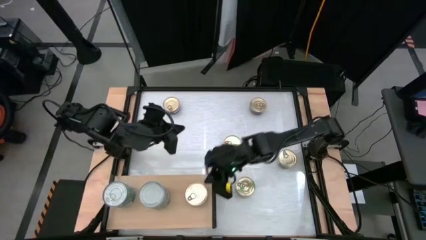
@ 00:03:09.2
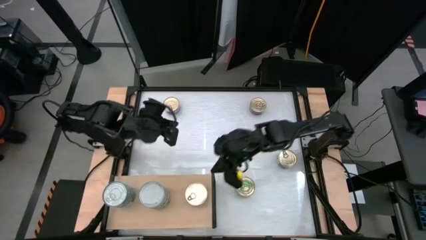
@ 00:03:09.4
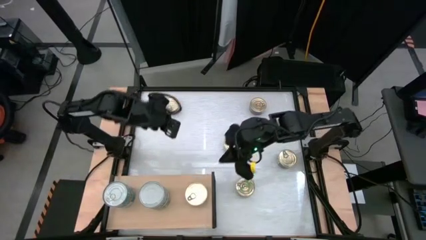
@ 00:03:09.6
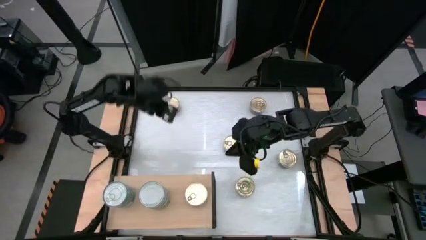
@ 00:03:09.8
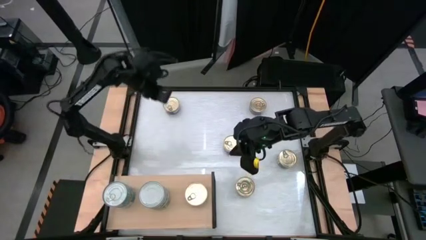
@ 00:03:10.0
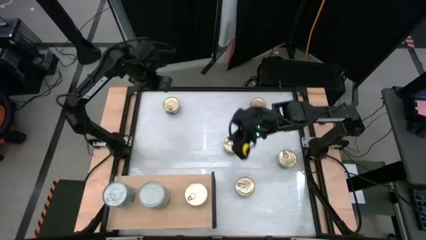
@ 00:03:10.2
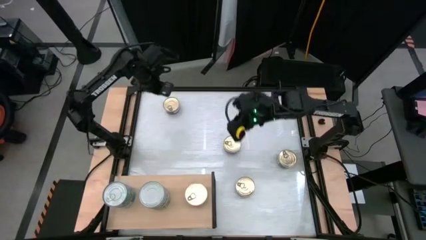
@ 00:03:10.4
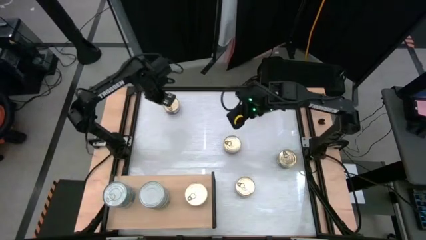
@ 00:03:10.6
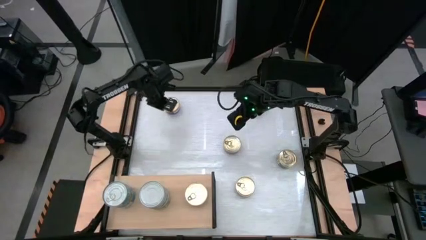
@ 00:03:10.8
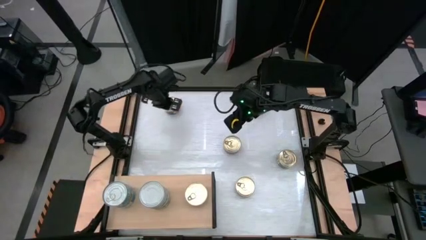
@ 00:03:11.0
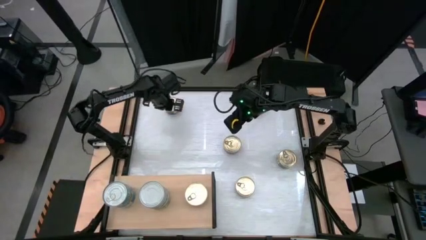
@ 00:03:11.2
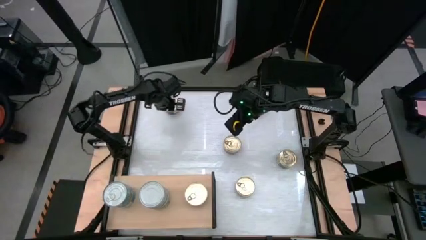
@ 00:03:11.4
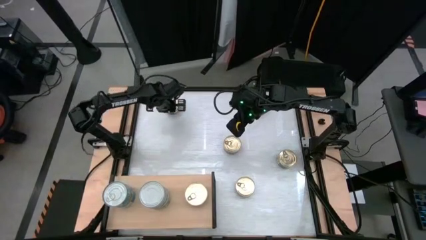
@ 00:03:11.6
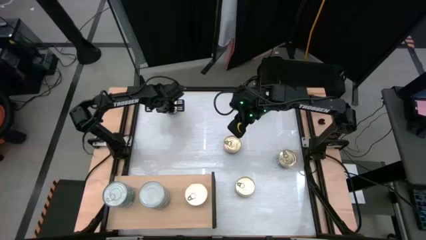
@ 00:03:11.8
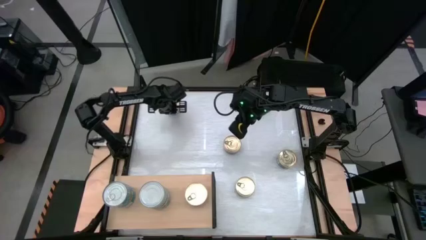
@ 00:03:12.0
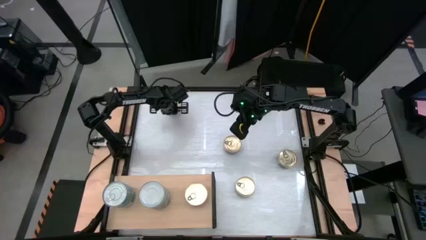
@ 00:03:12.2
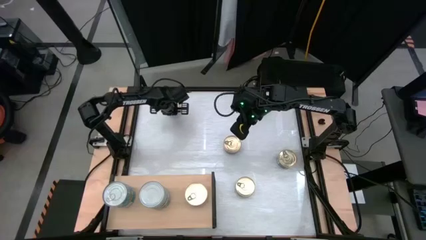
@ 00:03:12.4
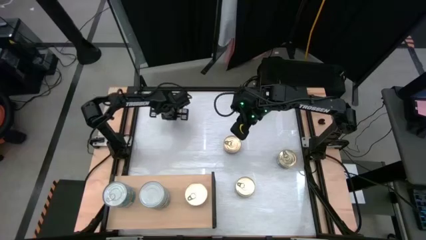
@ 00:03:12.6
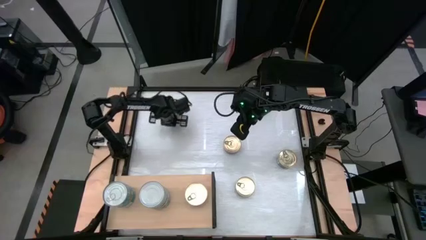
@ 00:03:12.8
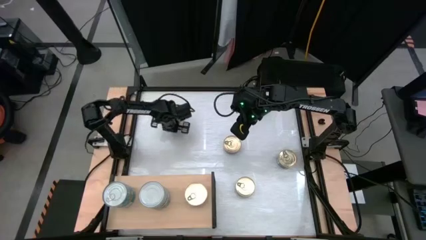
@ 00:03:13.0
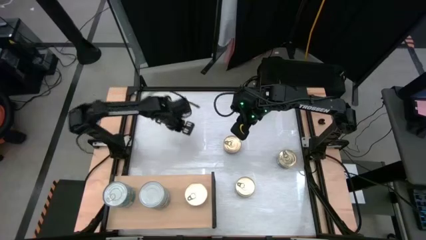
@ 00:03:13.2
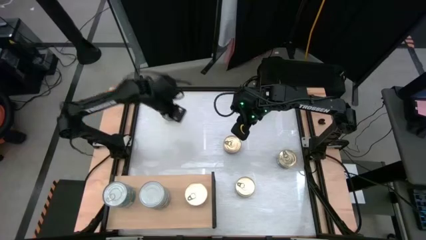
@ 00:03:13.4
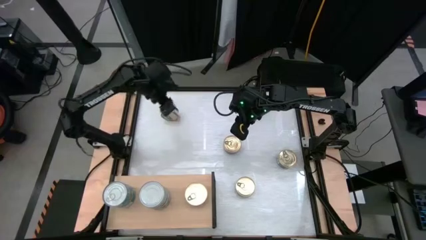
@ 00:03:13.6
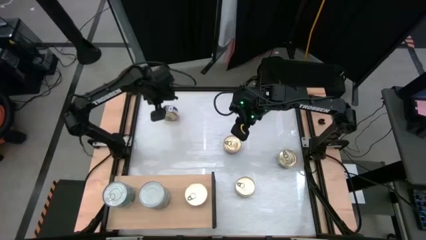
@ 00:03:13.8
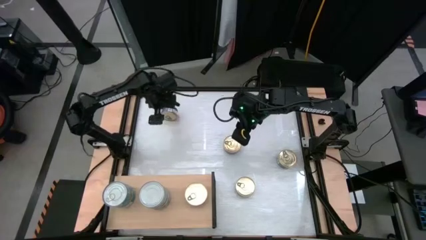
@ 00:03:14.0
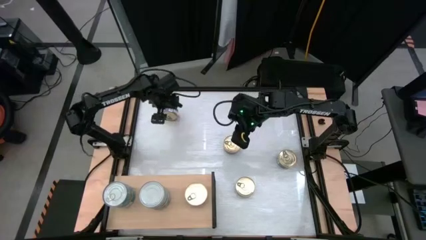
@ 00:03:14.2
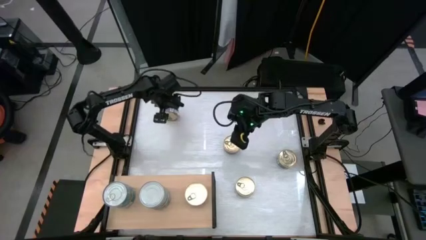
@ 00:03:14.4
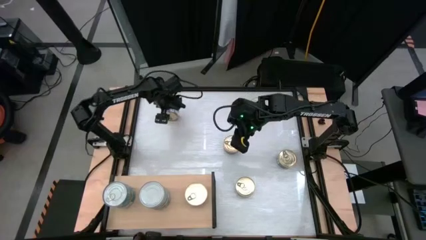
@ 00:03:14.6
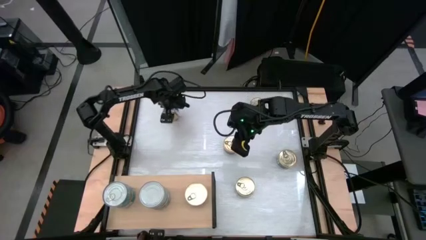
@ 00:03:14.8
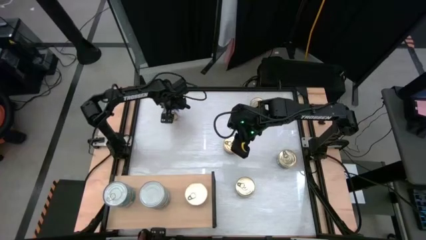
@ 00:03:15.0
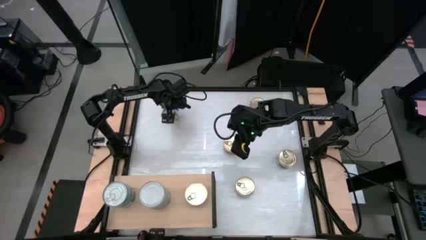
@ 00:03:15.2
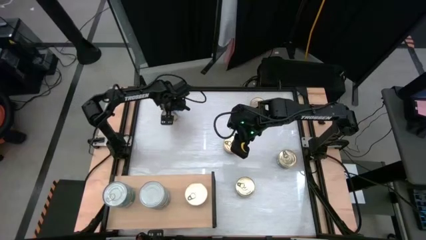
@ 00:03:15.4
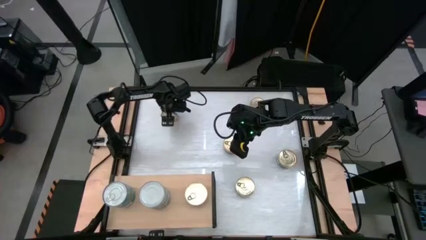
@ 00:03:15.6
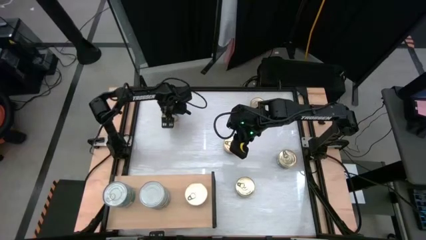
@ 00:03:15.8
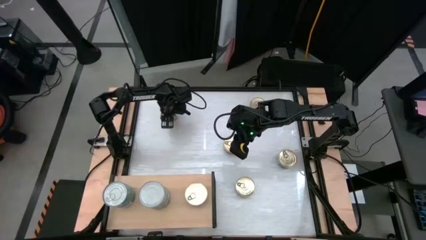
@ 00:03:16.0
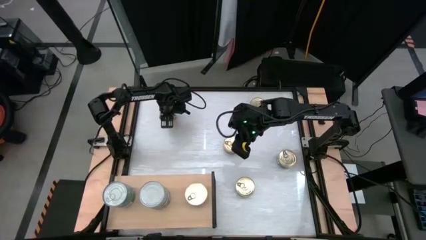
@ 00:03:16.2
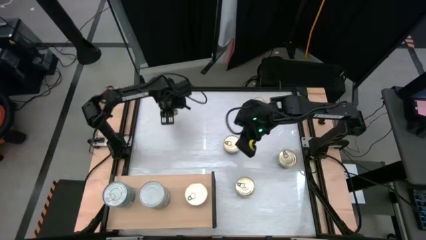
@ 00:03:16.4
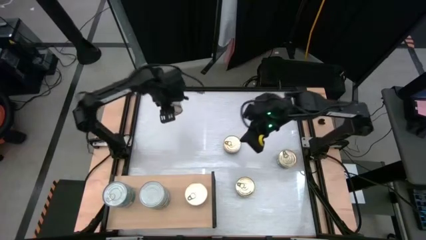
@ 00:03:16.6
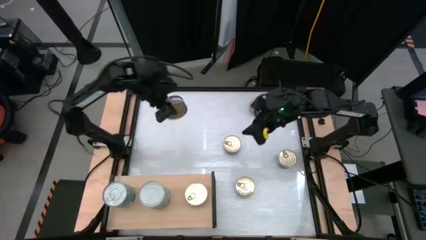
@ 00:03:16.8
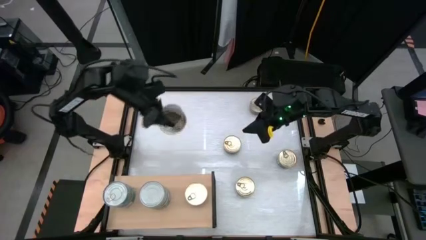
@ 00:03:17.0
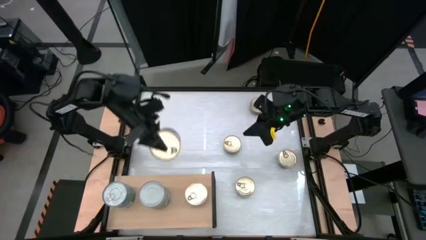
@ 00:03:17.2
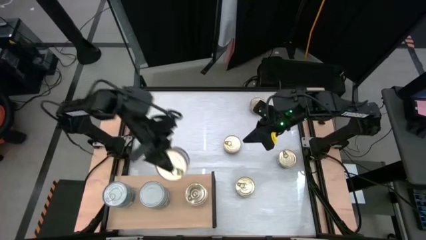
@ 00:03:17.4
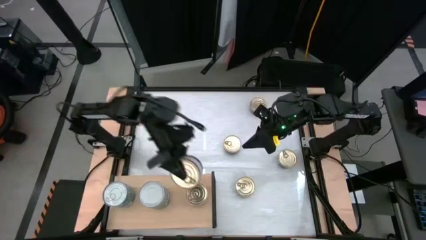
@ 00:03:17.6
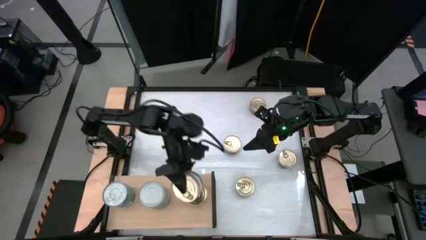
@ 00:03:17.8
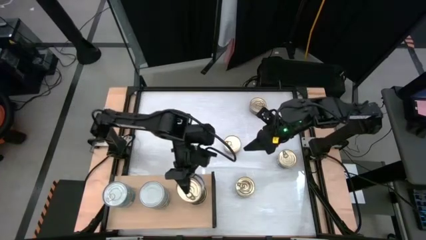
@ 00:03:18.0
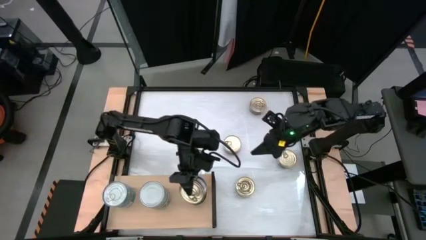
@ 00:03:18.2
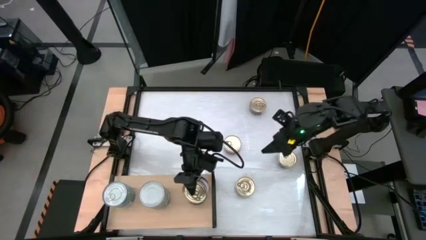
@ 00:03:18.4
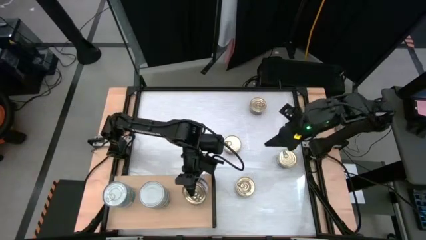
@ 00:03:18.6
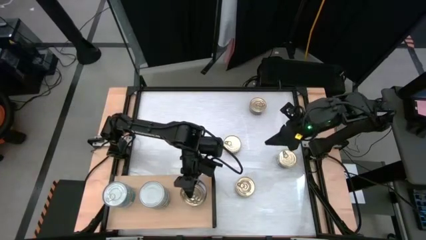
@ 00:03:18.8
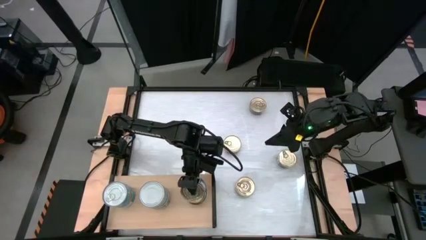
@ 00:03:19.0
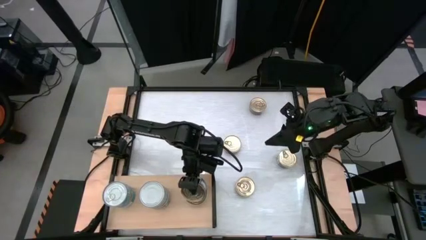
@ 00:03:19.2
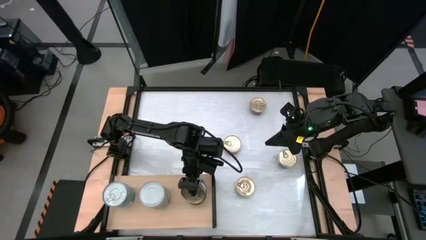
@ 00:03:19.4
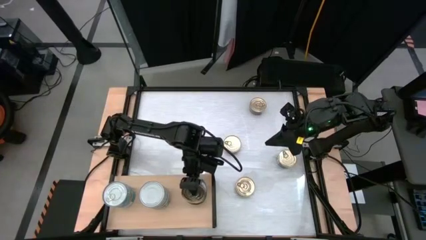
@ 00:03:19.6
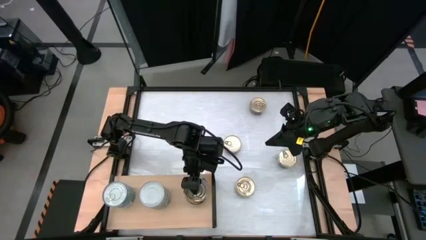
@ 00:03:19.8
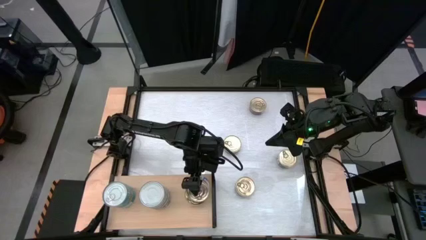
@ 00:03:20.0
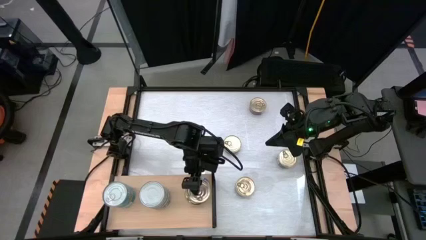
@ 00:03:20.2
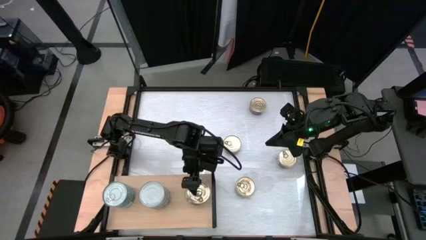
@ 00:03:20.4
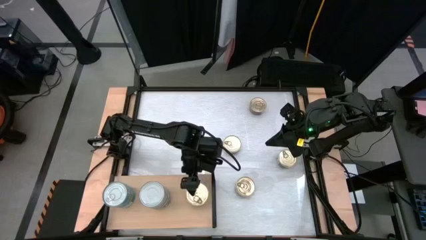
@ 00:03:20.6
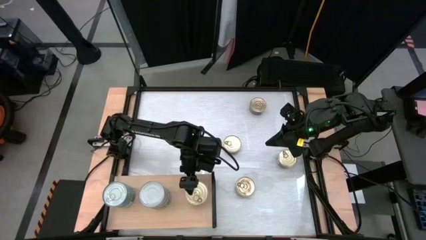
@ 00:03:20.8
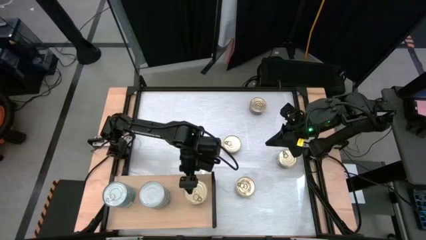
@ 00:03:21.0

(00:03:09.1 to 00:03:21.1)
Task: Stack canned seafood by type on shelf
Stack the blue pink tuna can on top of the blue pink tuna can on the shelf

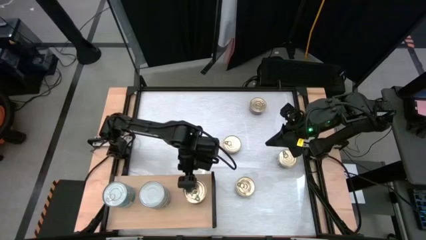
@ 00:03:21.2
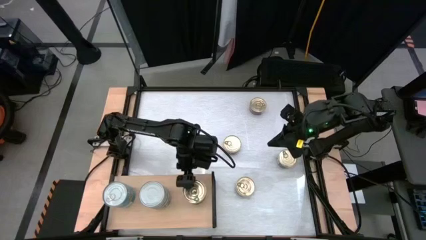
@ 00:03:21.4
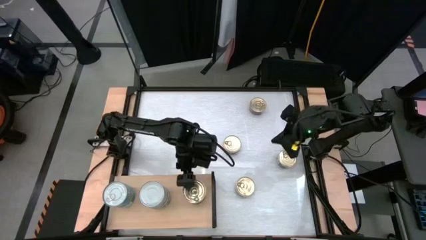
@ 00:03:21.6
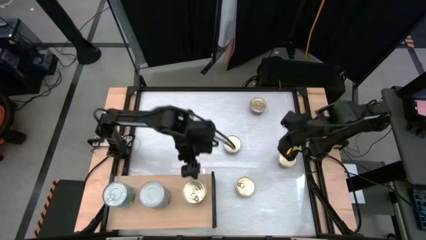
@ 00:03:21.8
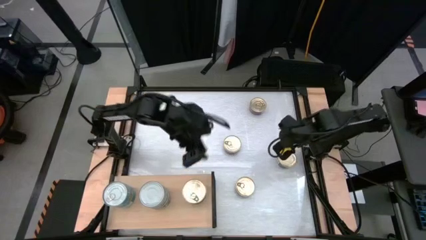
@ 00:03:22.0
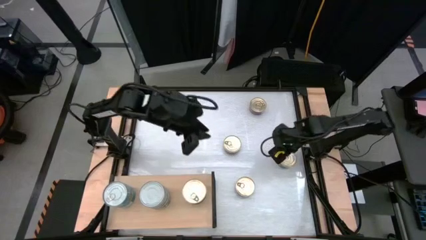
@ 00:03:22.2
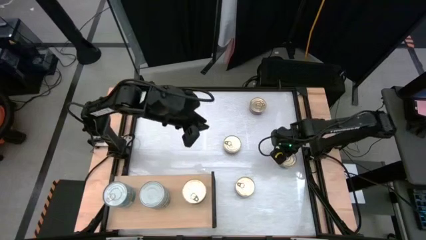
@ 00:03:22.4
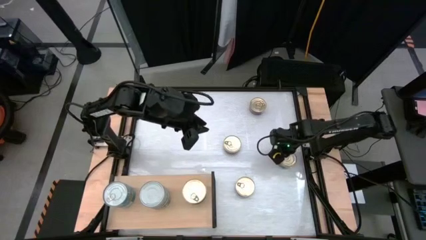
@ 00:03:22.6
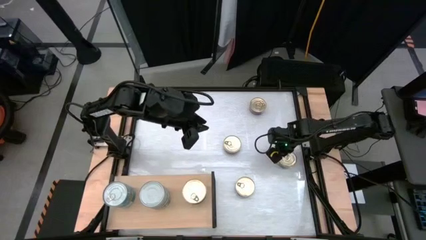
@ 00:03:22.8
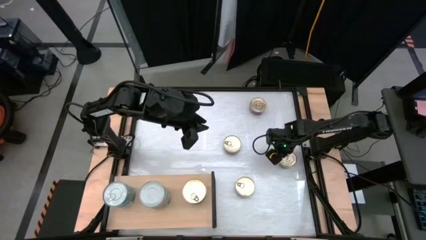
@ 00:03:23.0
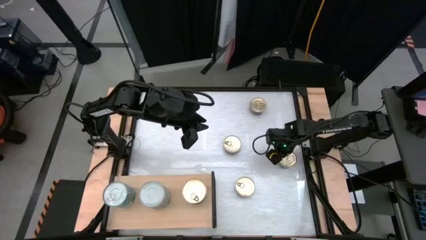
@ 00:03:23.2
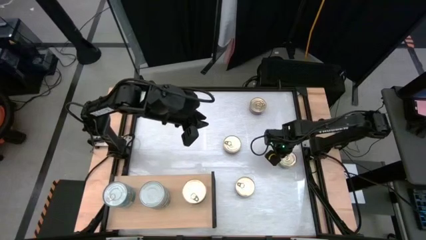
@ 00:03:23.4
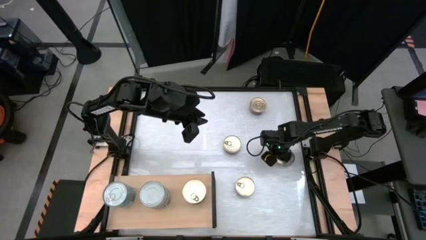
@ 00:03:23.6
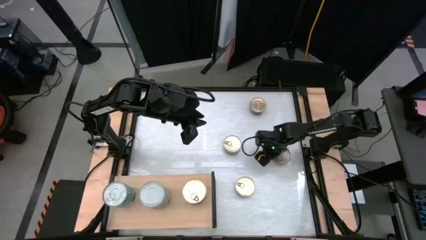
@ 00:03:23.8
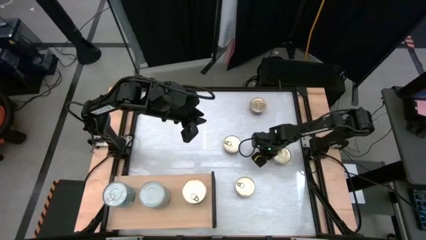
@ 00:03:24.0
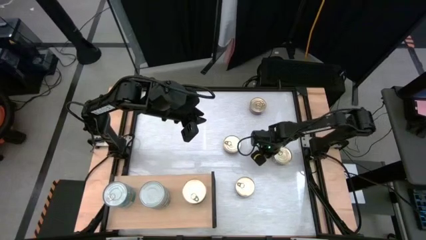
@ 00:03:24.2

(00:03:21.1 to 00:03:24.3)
Stack the blue pink tuna can on top of the blue pink tuna can on the shelf
